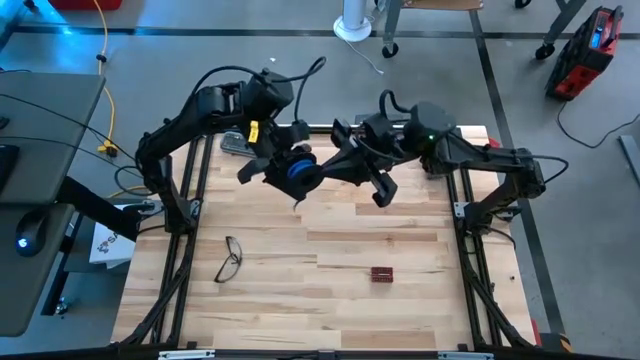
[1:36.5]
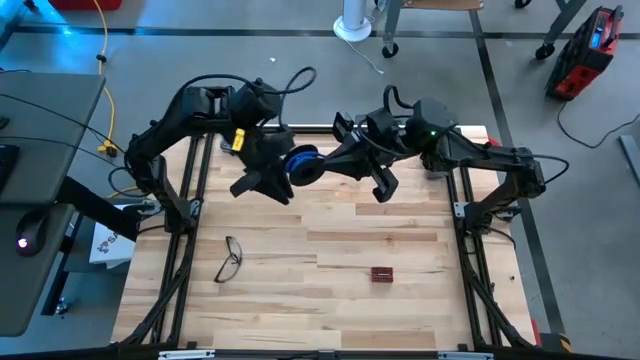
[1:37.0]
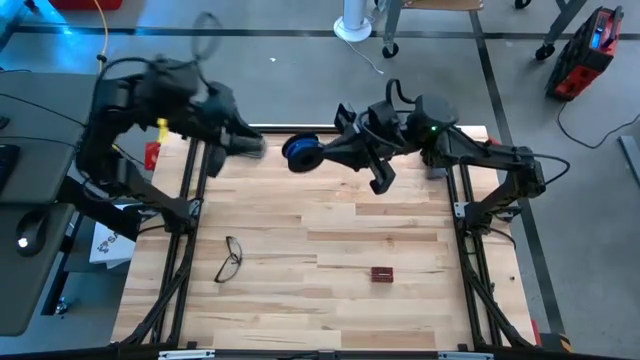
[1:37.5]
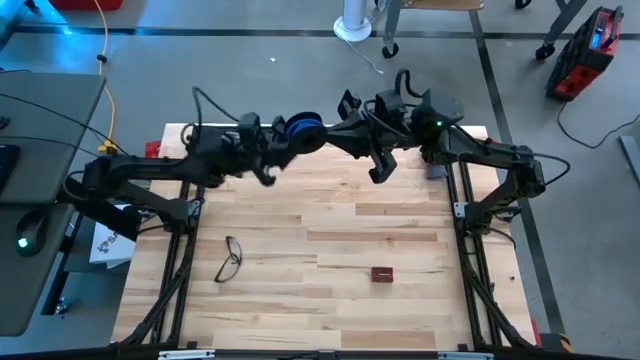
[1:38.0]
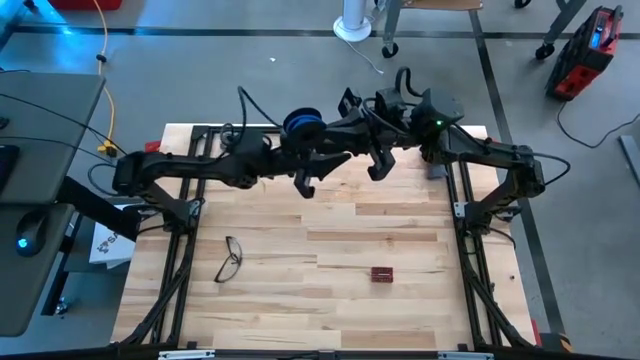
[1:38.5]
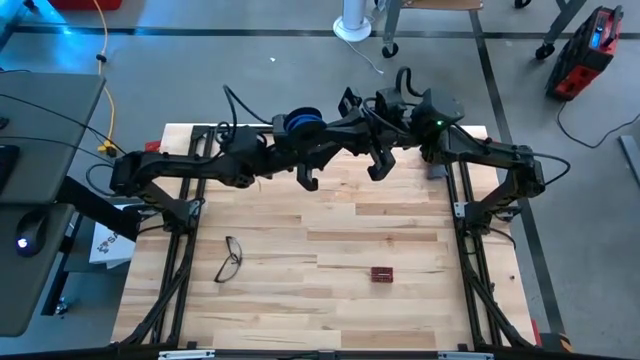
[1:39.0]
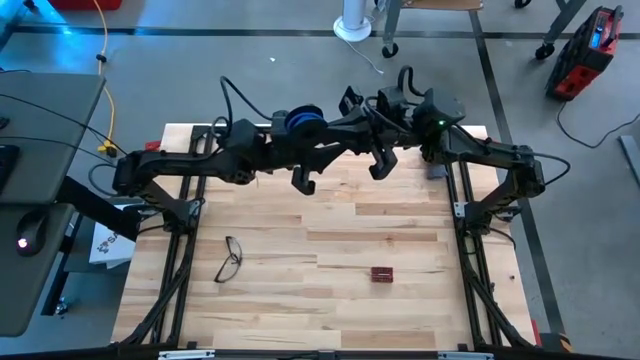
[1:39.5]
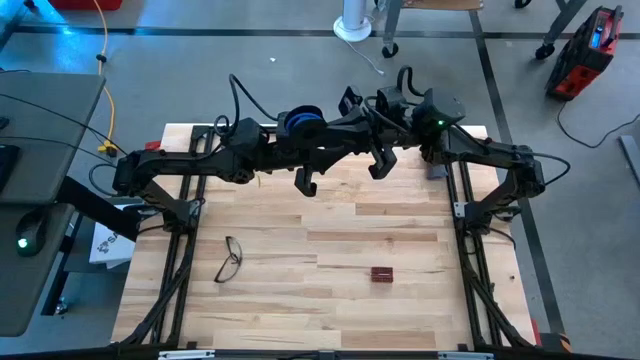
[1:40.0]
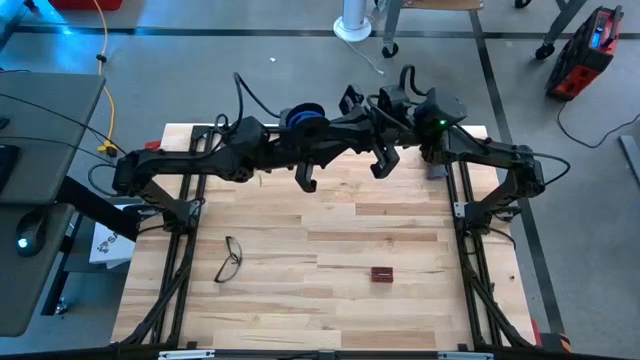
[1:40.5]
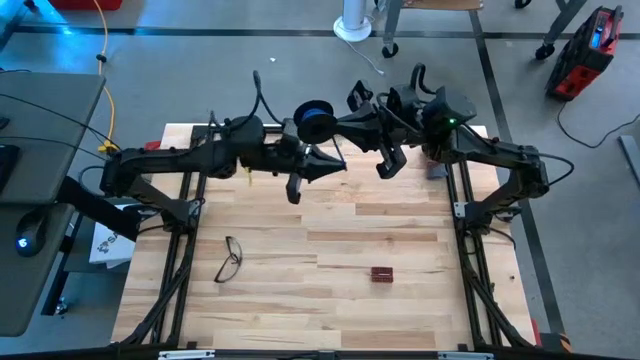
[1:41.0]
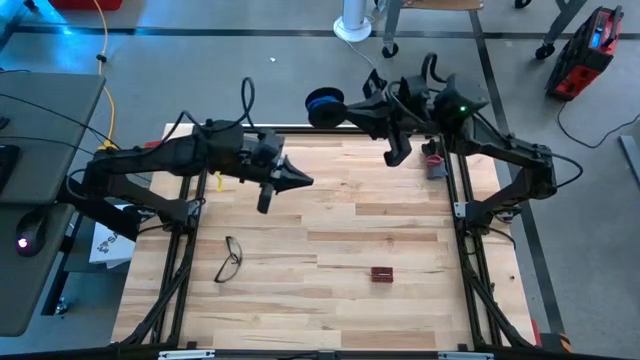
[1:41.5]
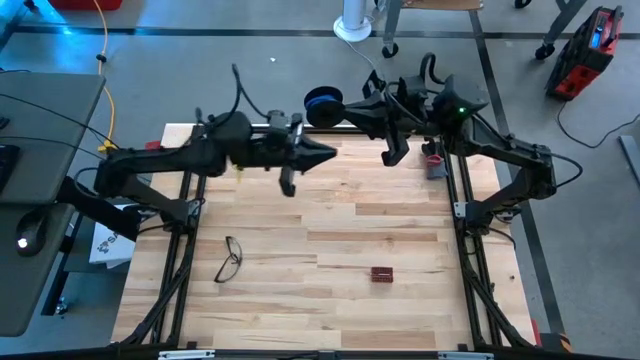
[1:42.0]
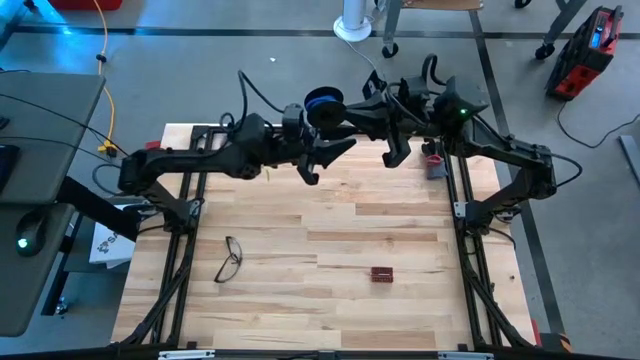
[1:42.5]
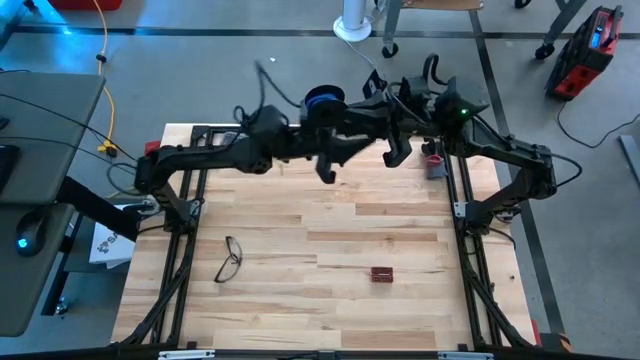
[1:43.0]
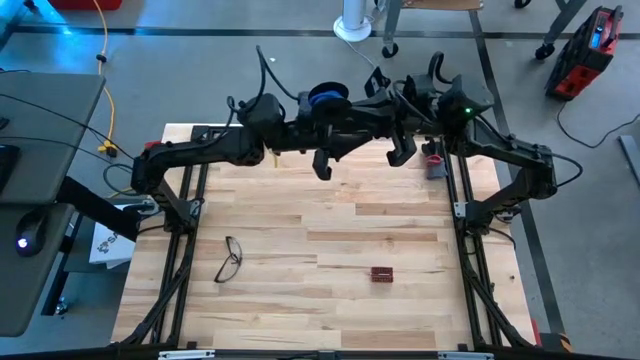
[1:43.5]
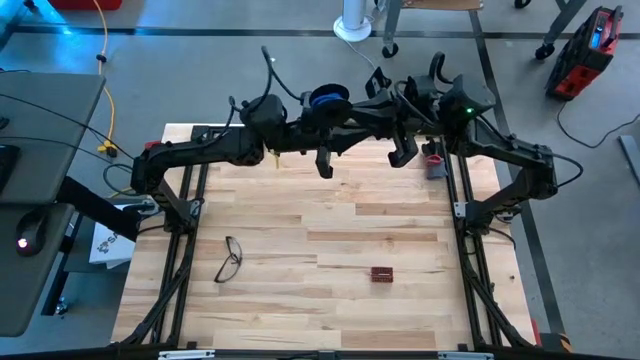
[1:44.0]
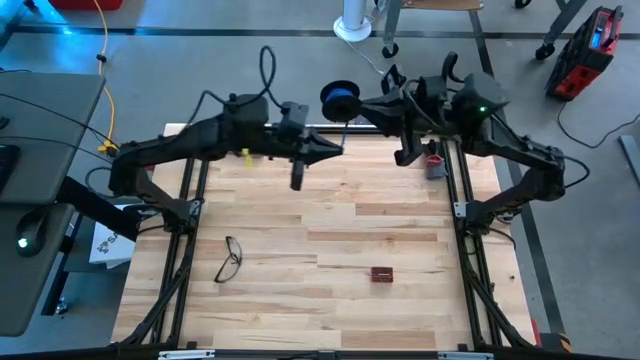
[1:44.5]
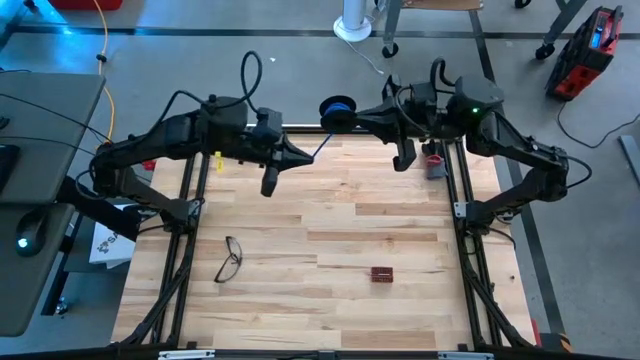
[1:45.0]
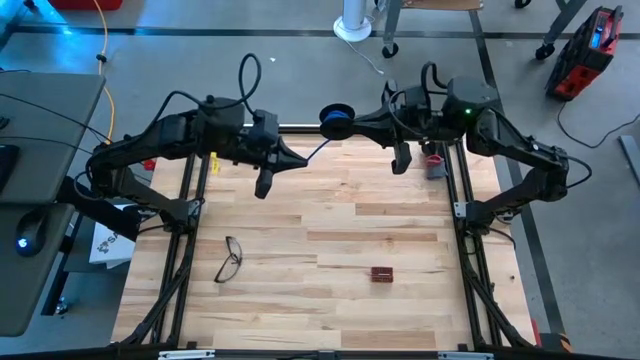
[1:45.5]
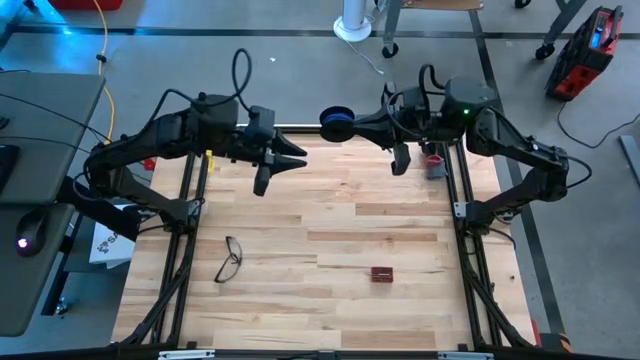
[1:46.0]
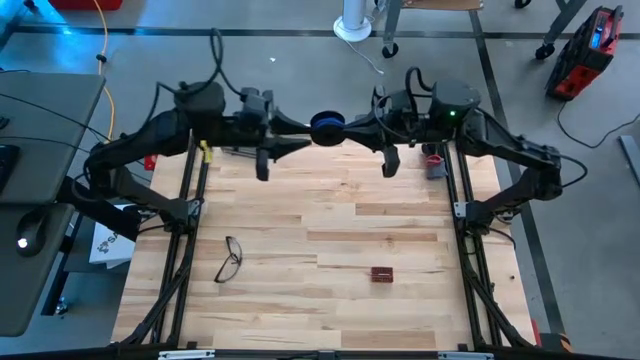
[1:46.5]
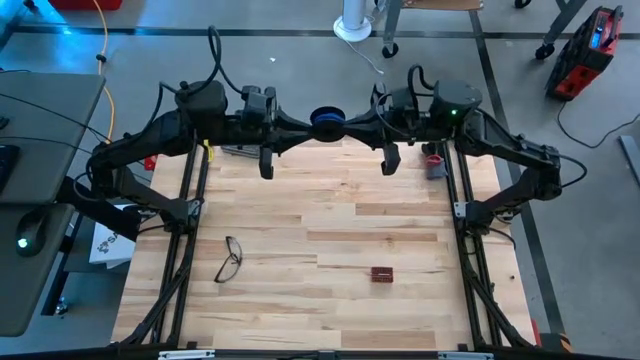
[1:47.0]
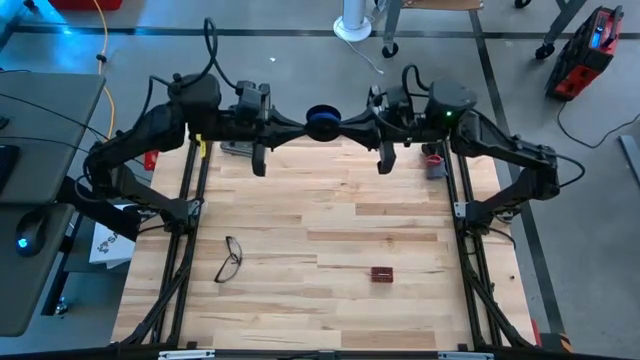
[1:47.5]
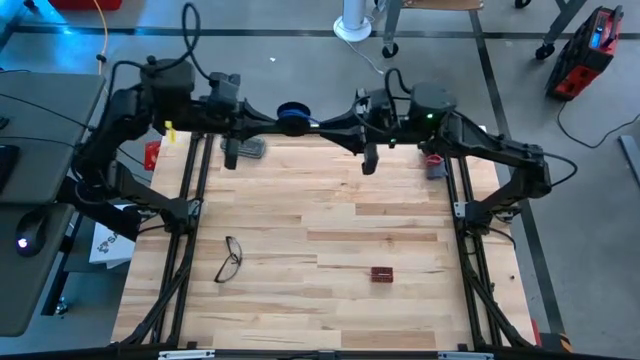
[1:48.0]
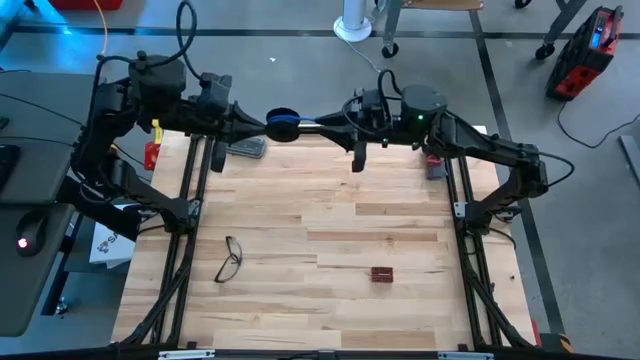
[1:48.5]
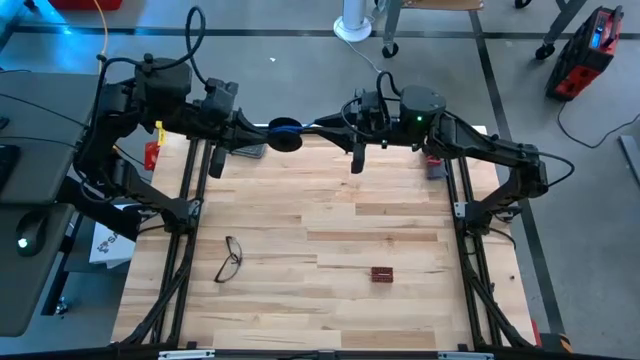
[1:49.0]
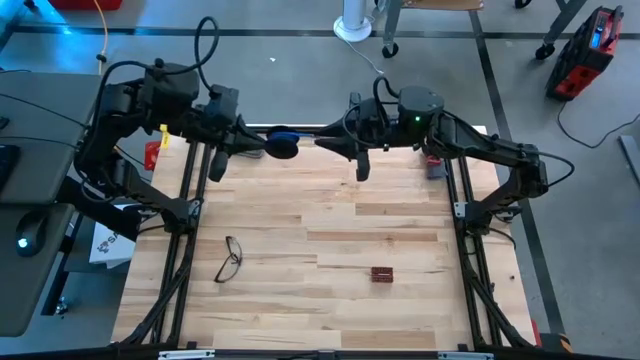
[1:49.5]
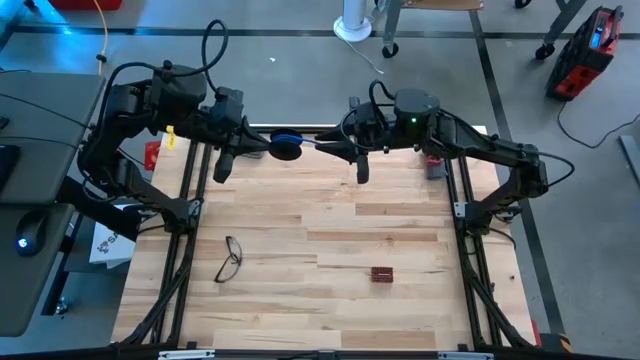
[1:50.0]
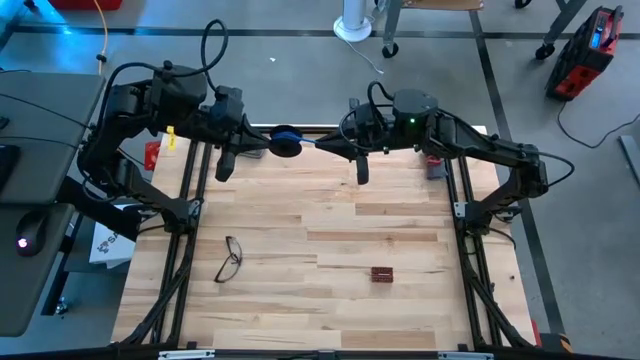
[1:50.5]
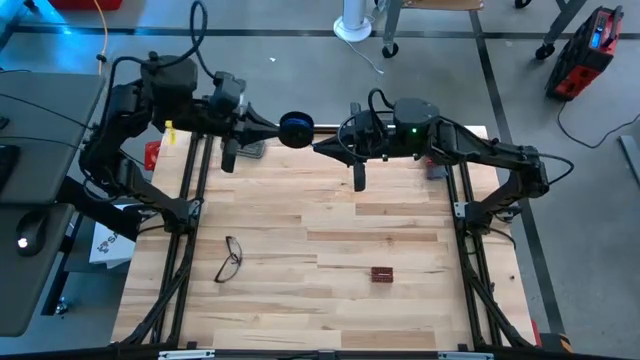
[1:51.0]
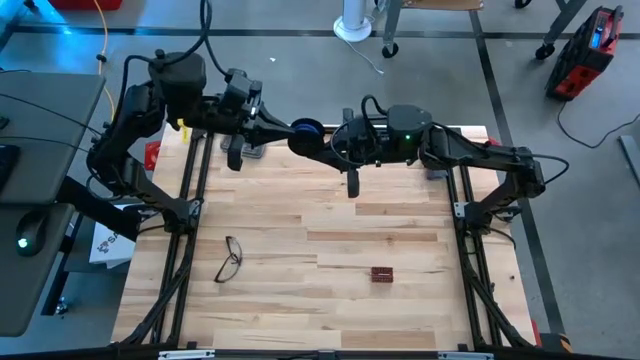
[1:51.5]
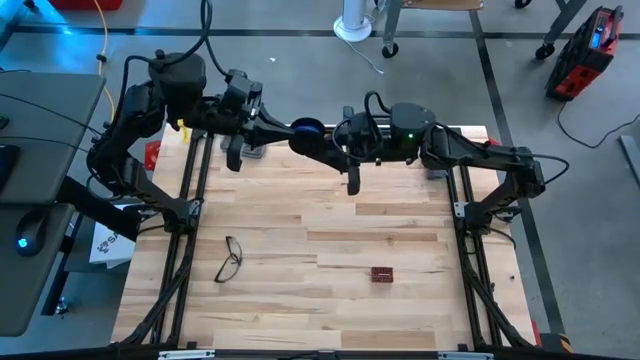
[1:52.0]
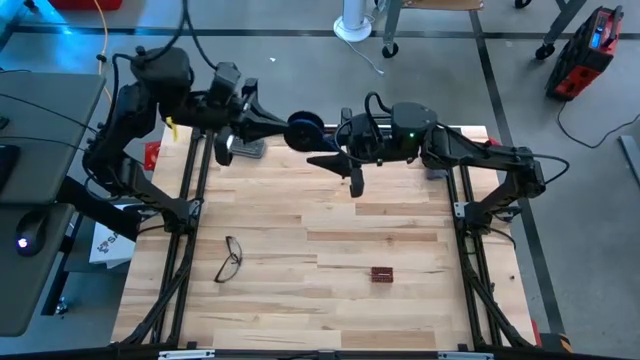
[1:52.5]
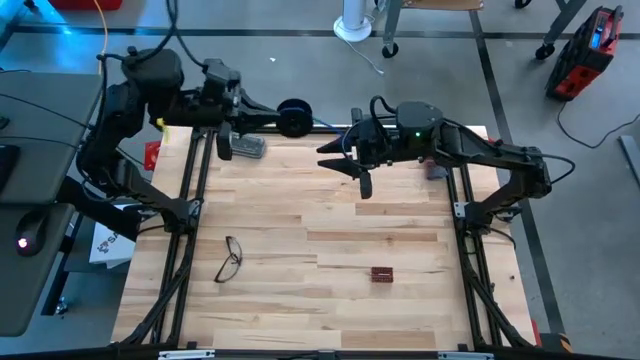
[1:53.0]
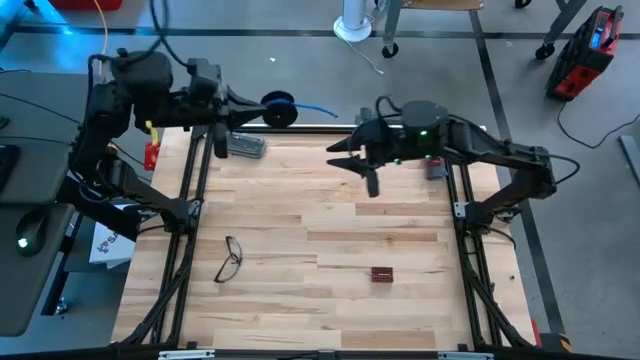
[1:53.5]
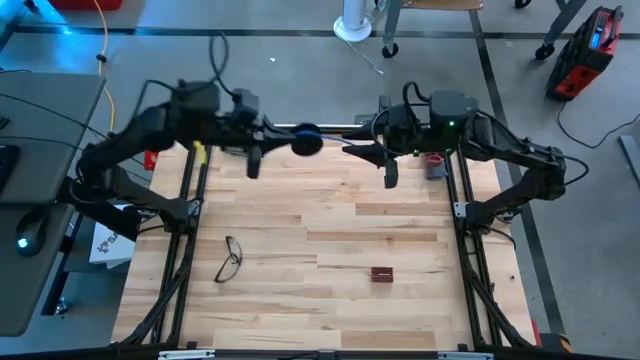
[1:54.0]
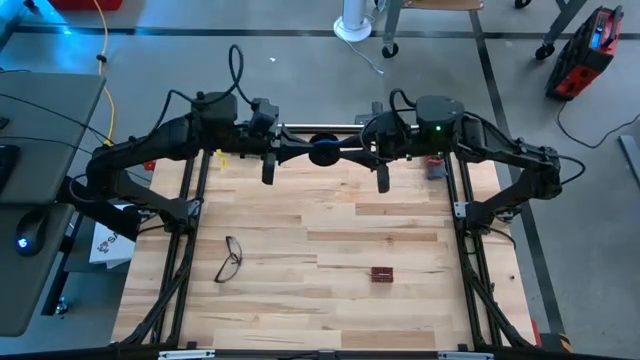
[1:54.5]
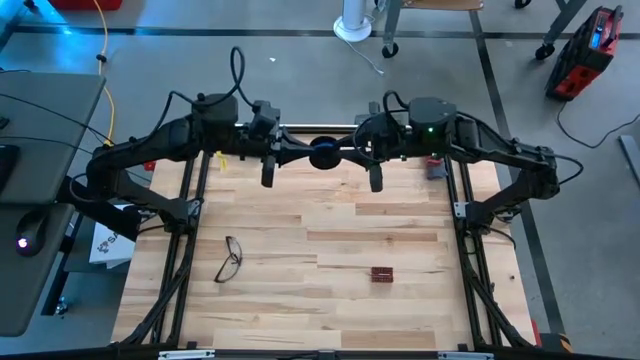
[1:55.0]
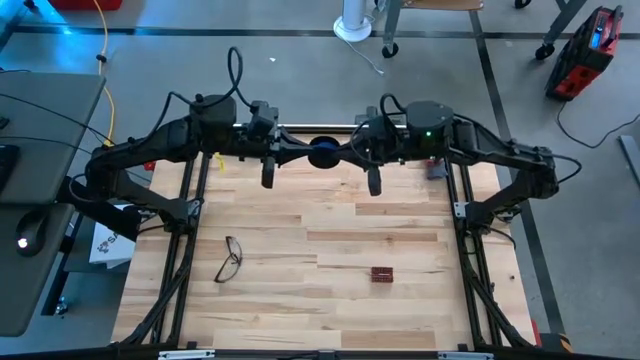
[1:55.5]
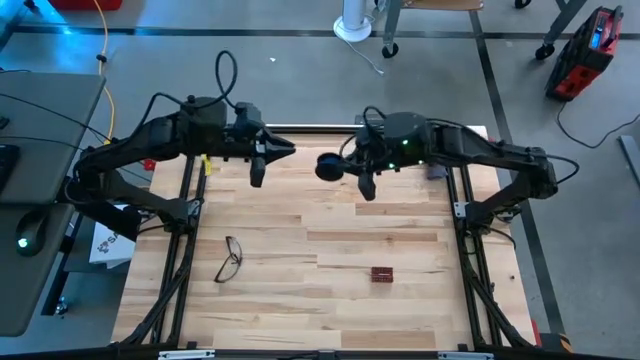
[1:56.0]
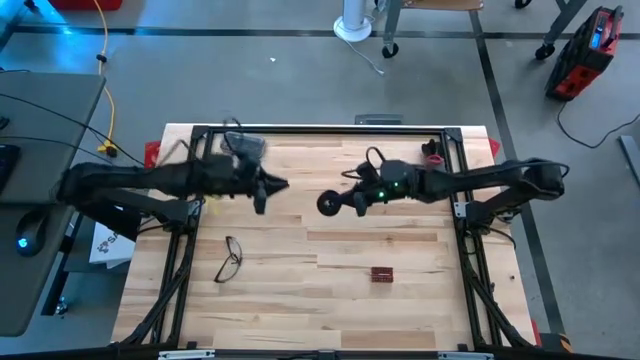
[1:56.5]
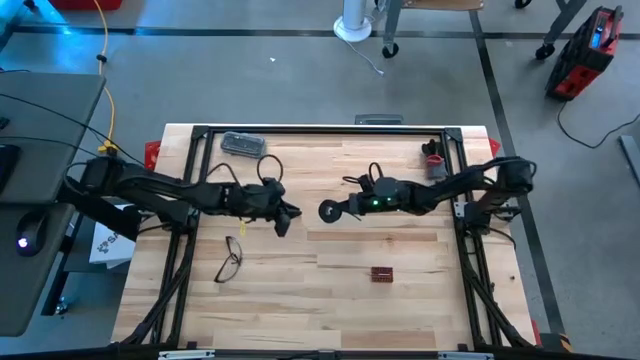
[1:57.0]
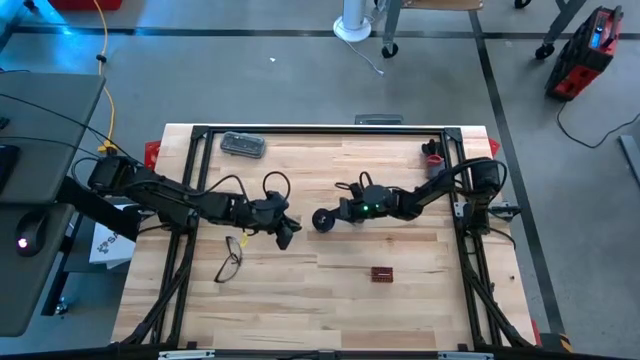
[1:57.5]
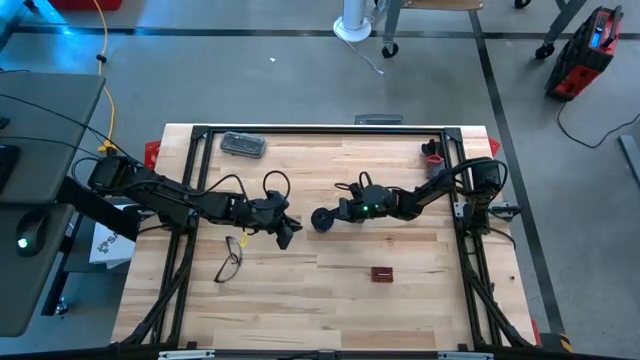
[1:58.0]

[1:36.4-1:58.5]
Task: Coil cords
Coil the blue wire onto the spool
